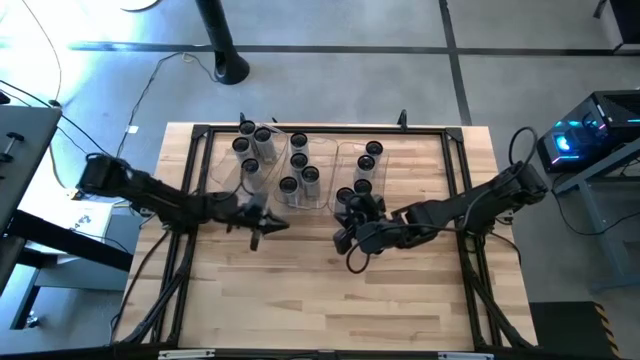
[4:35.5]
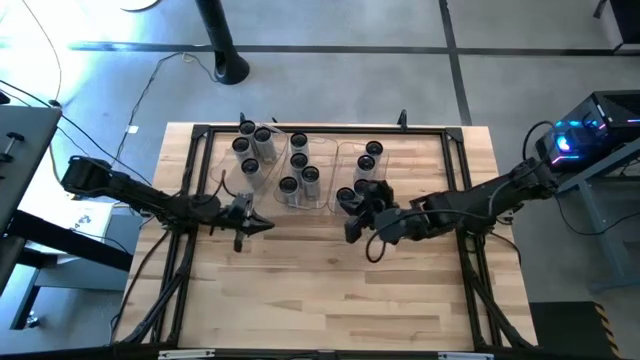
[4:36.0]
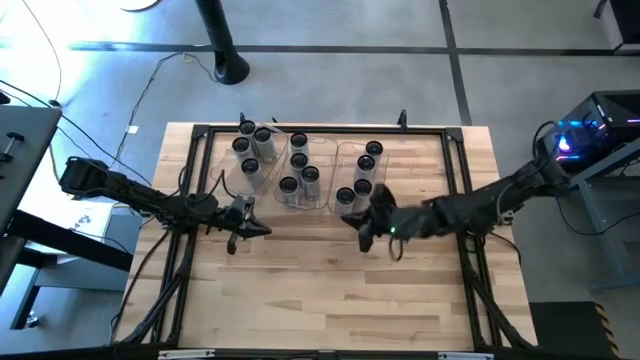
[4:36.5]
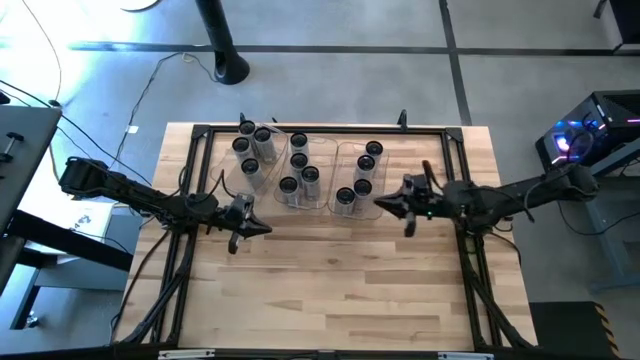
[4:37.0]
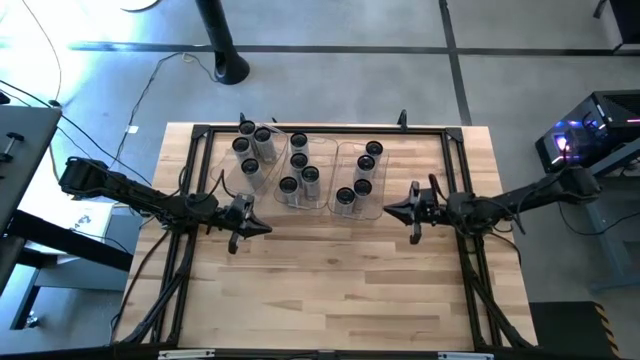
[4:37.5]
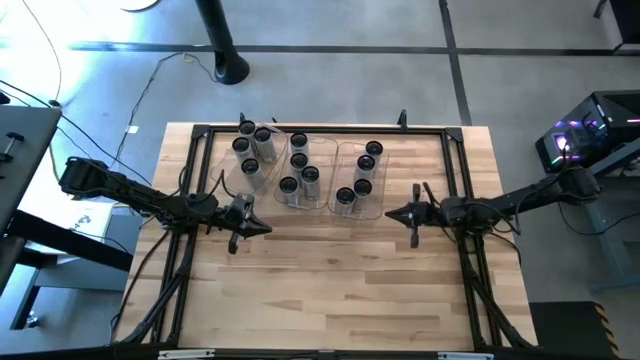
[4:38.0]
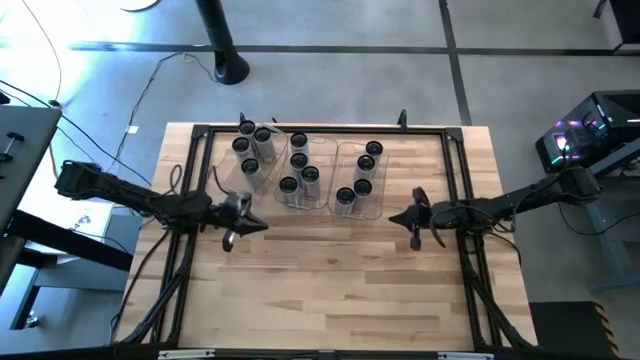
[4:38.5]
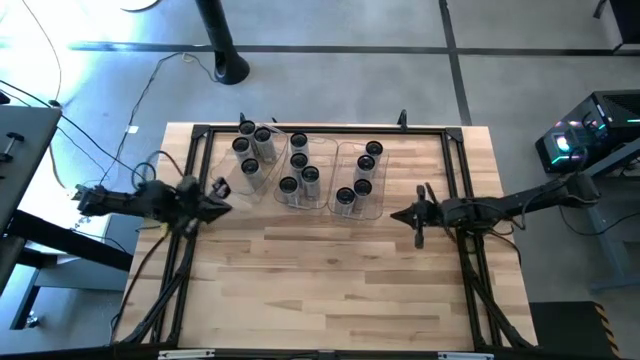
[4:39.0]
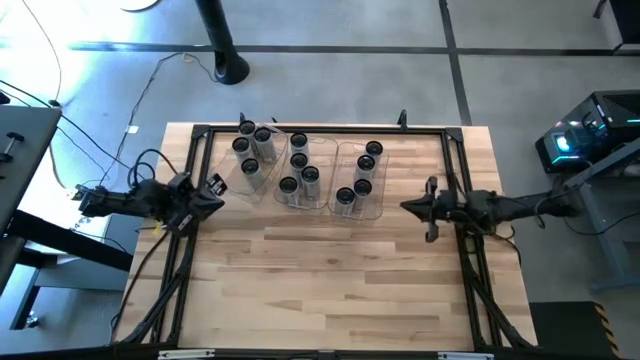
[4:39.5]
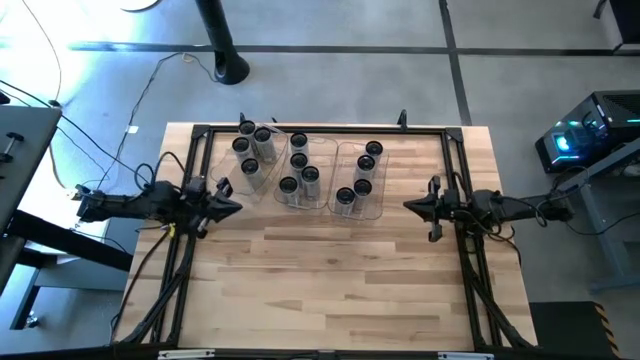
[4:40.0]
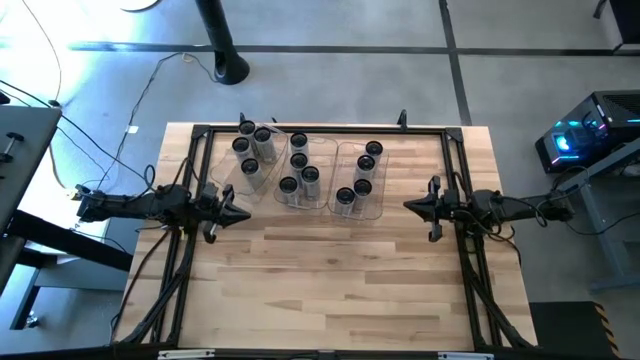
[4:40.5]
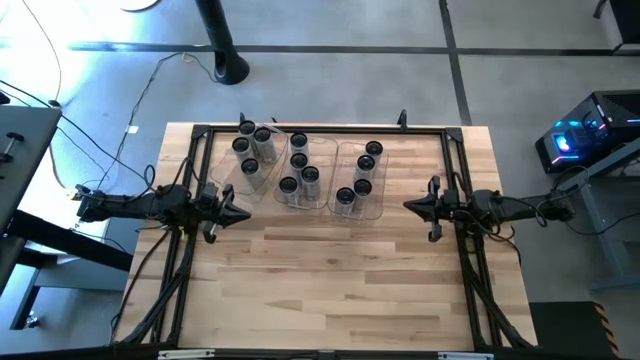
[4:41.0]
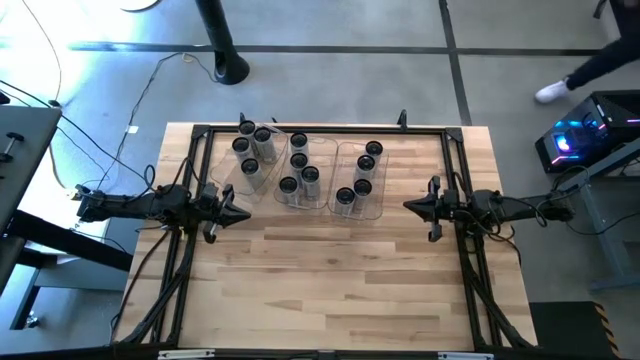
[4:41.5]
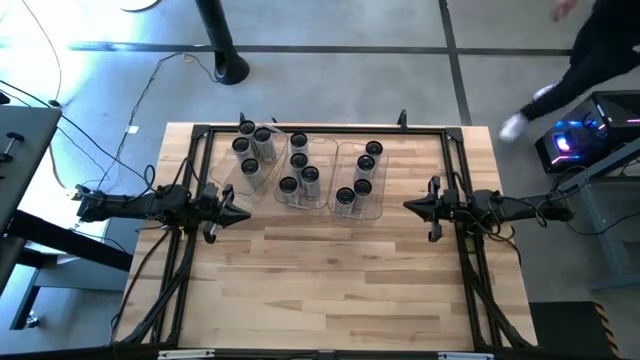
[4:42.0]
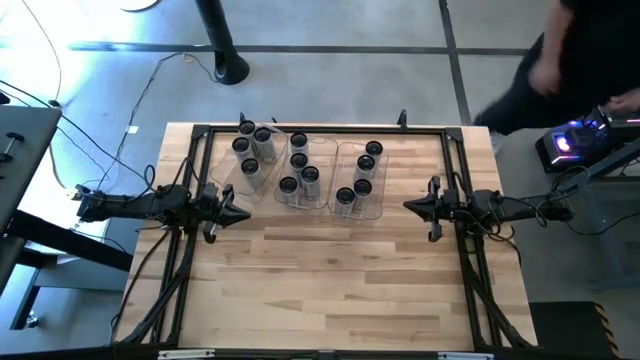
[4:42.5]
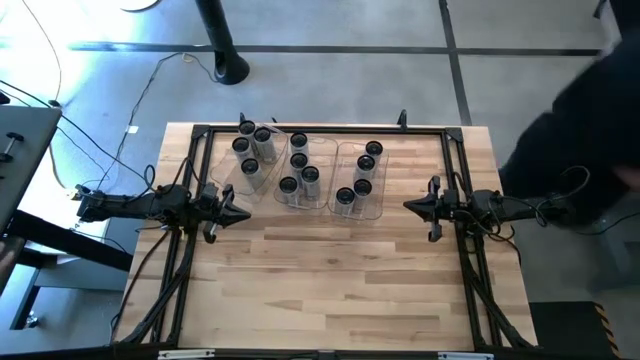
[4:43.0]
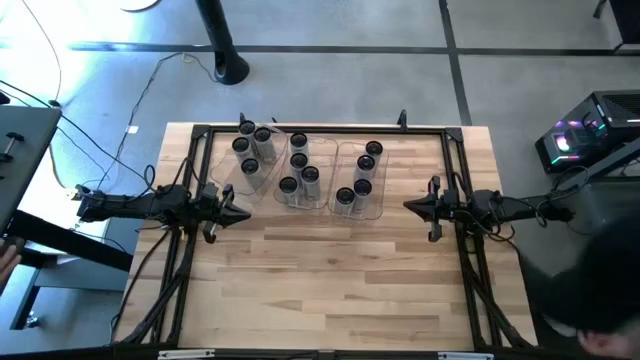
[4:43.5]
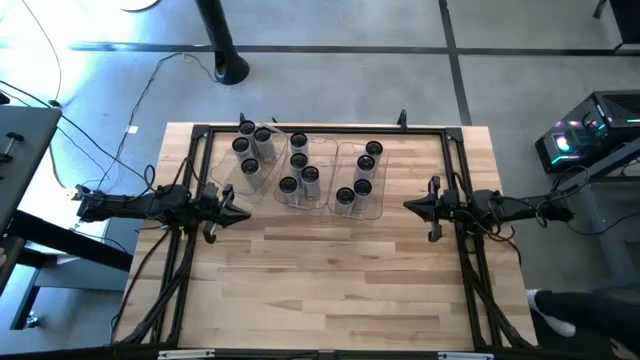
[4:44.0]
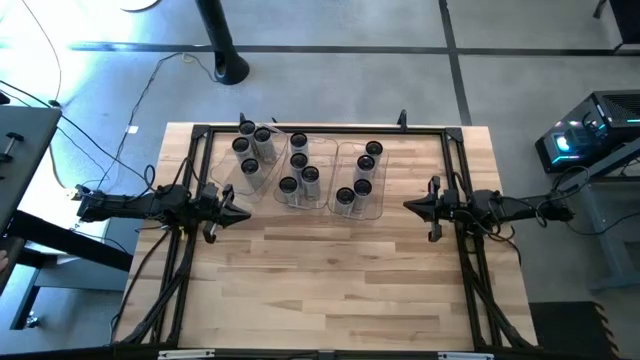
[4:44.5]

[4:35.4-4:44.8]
Task: Sort soda cans
Return to Home Position

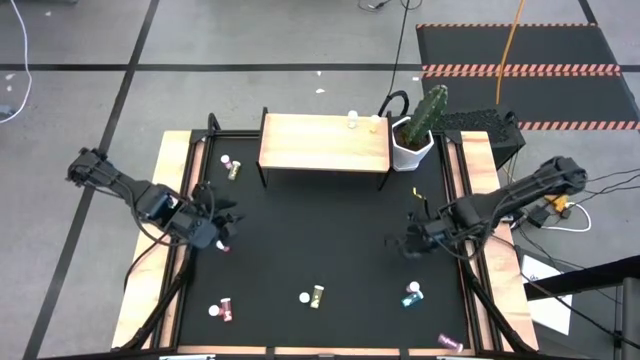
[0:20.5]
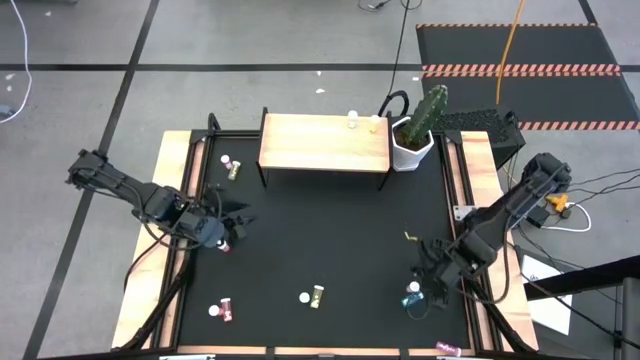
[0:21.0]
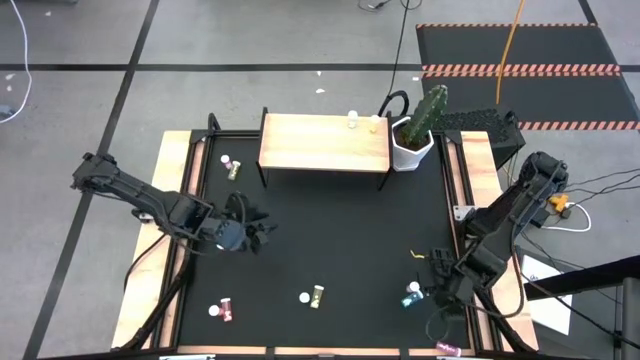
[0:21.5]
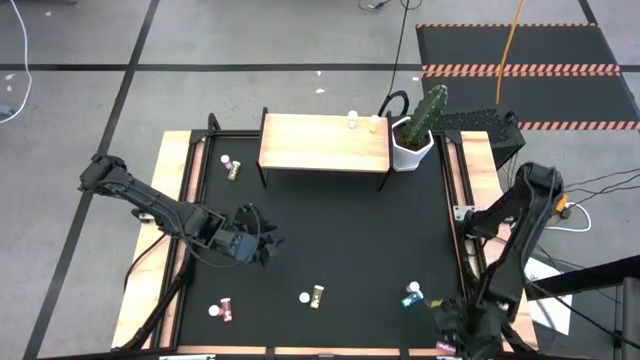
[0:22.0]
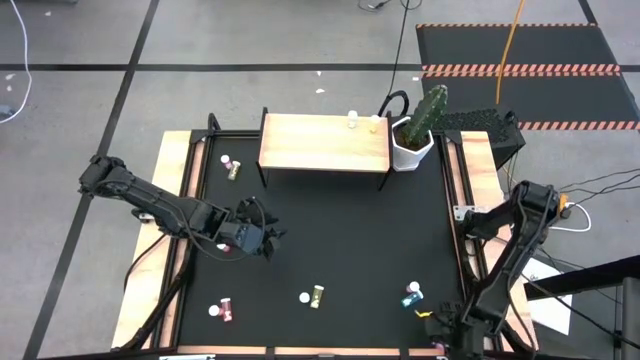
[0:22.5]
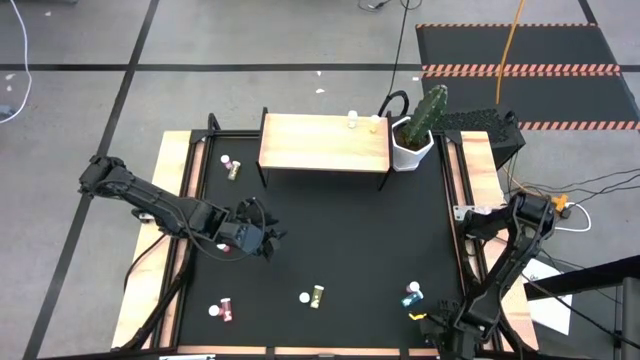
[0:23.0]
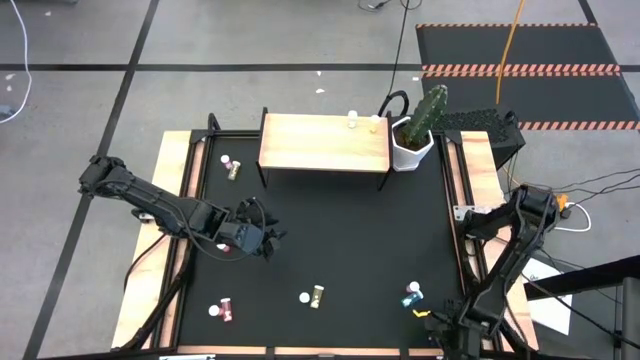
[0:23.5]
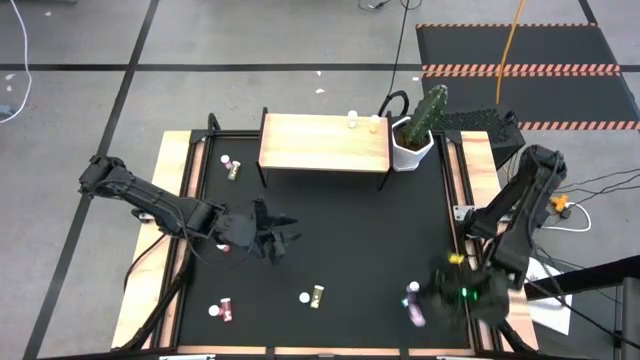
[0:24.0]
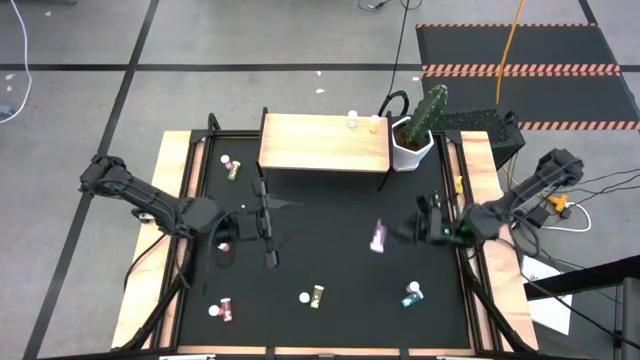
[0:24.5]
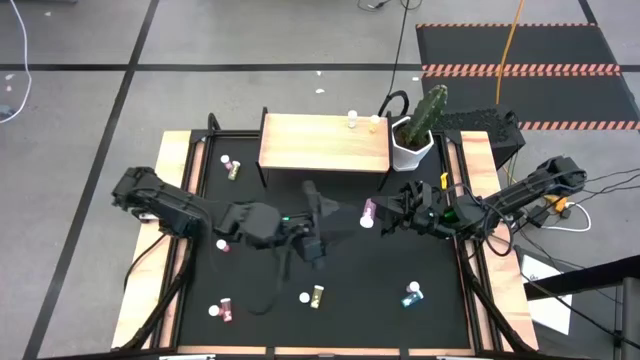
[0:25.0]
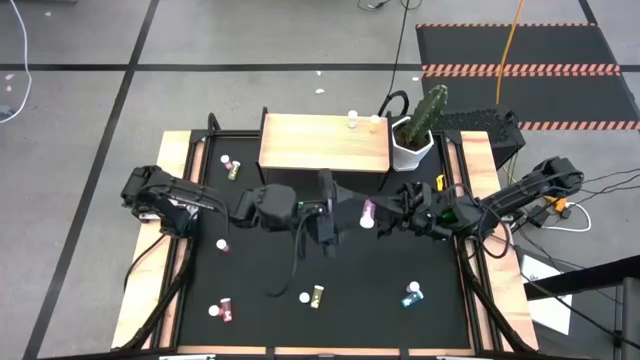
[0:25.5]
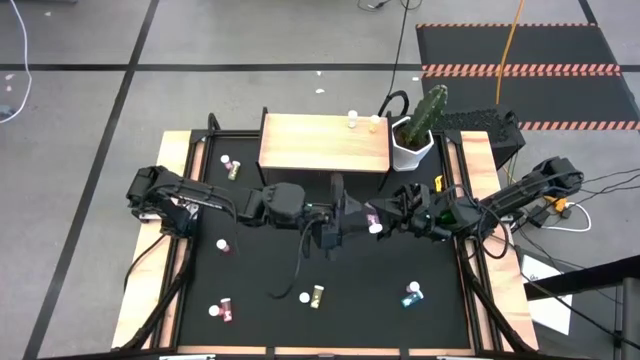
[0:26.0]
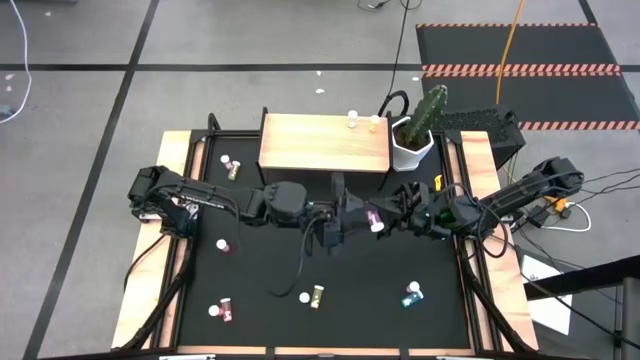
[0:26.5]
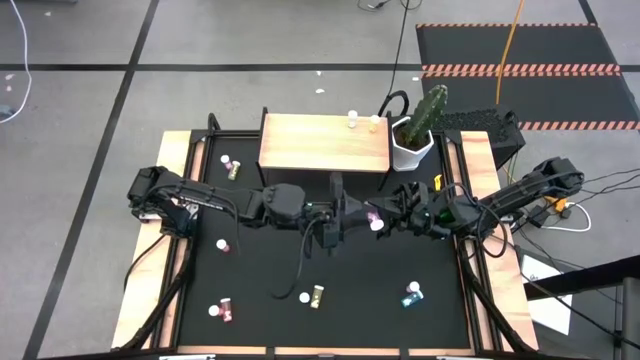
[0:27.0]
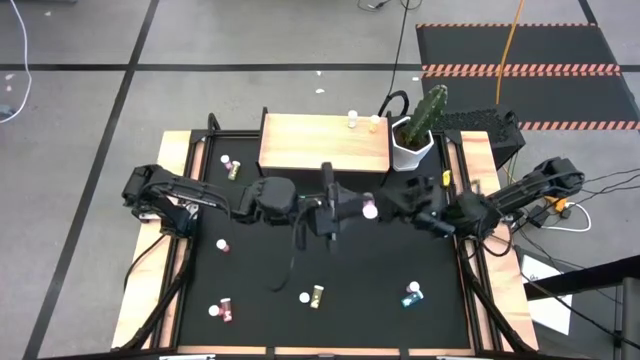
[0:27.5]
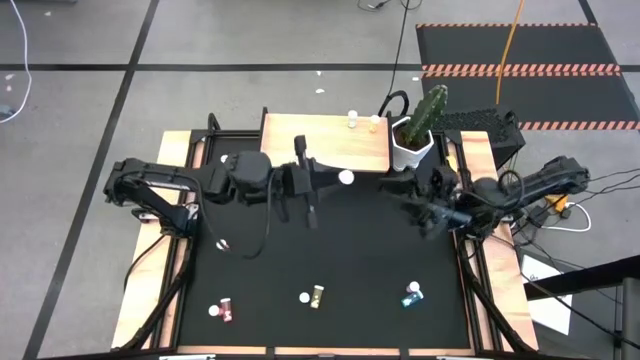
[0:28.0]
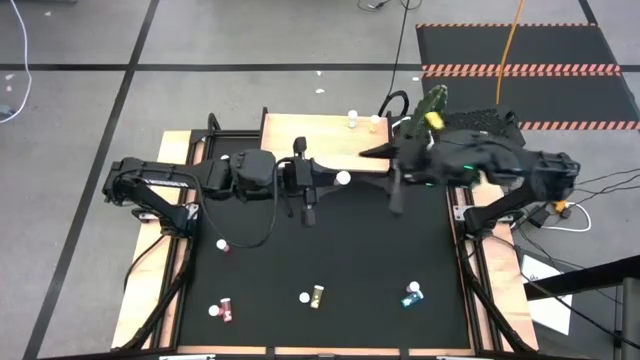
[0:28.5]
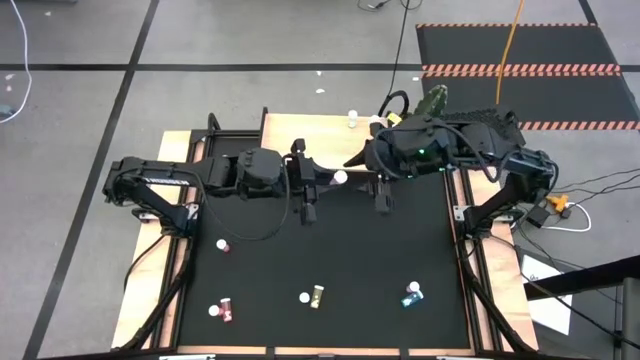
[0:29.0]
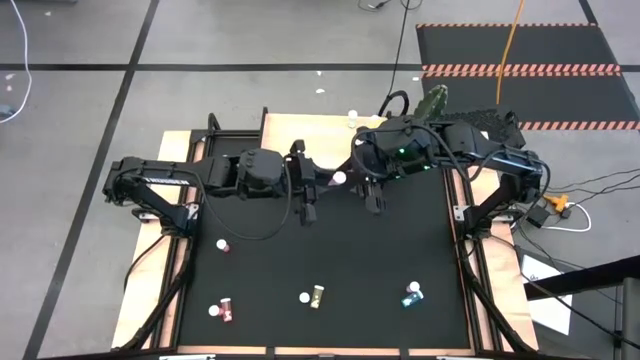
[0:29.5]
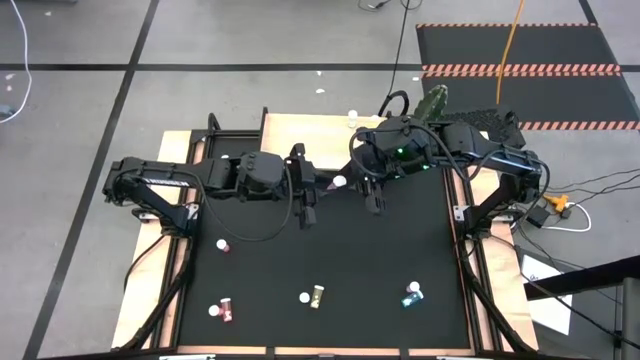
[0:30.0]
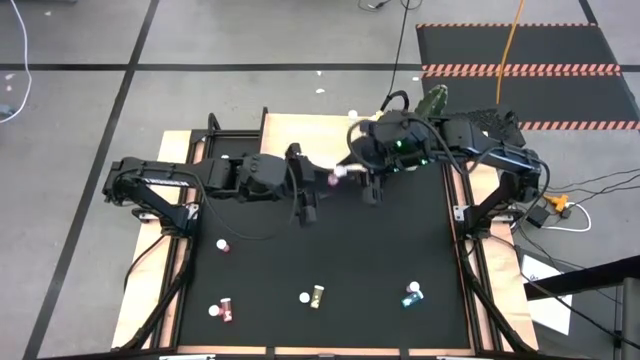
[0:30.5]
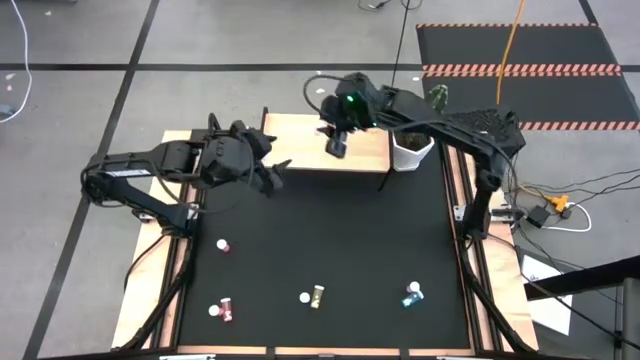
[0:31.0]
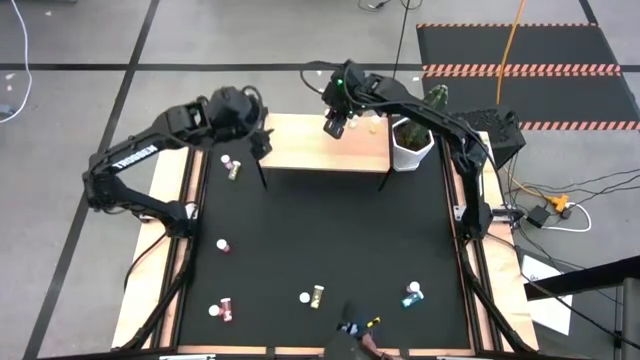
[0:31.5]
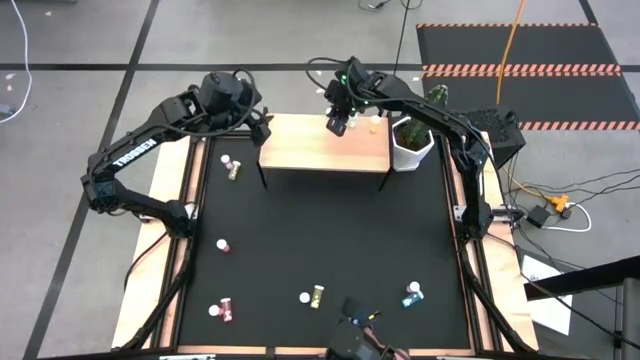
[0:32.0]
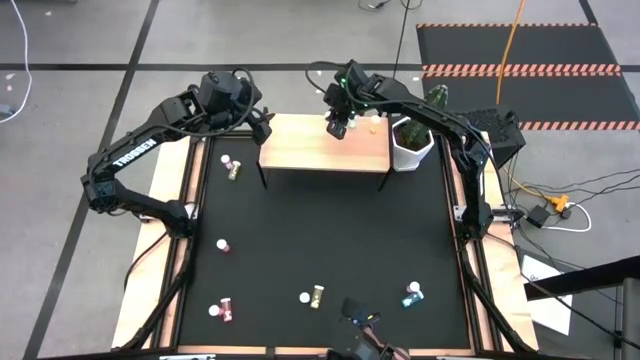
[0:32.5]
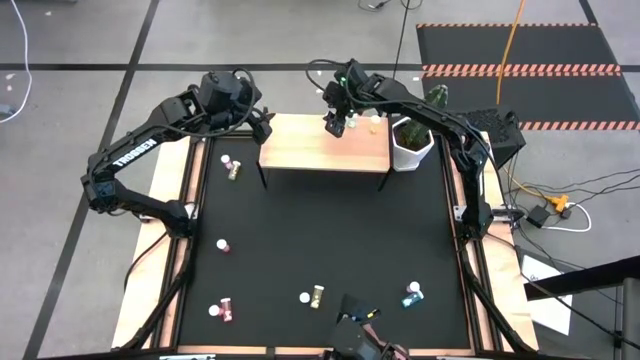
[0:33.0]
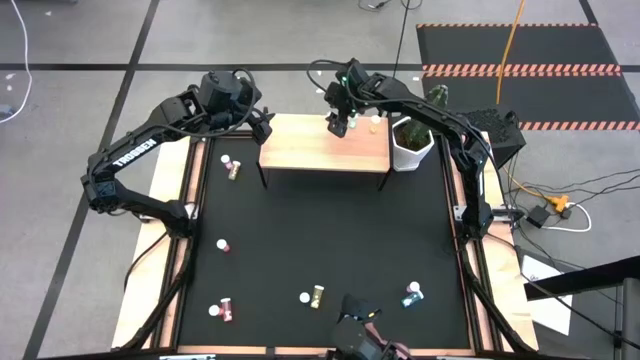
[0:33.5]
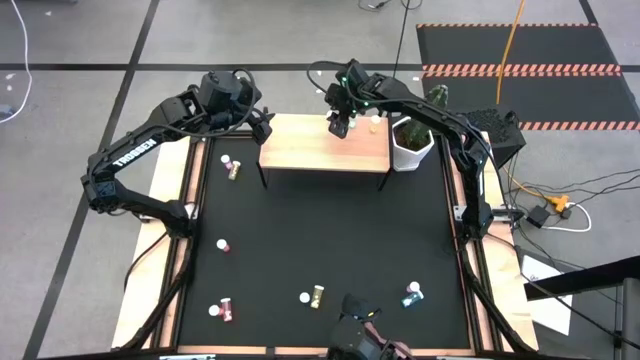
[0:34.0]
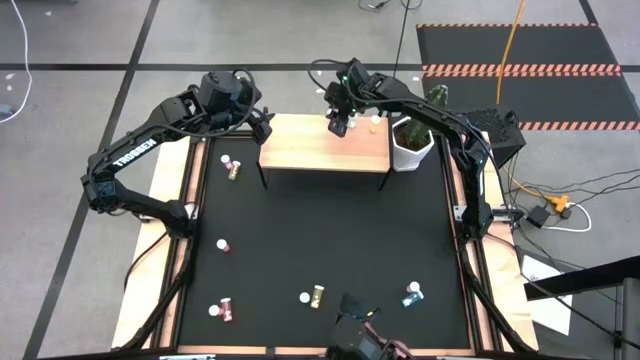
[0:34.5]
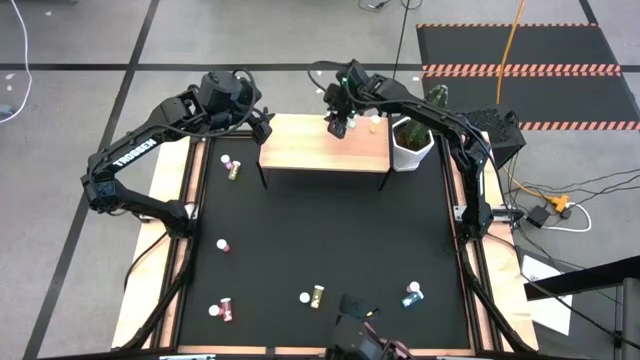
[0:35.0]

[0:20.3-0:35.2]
Task: Pick and place medicine bottles onto shelf by color
Put the bottom purple pill bottle on the shelf
